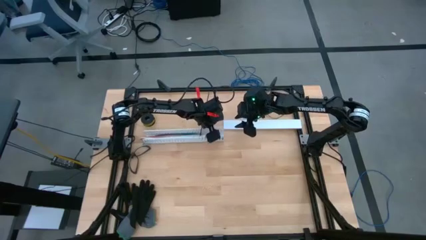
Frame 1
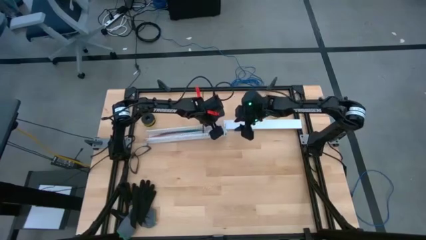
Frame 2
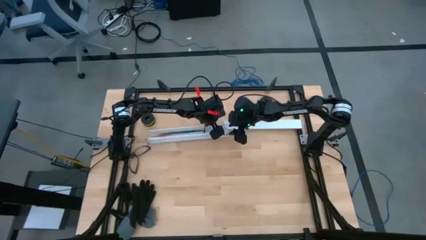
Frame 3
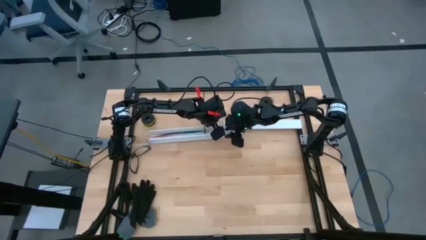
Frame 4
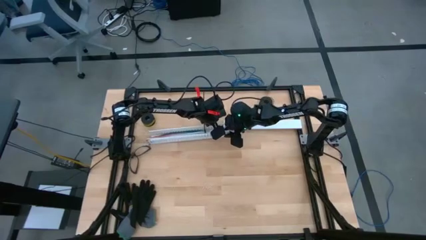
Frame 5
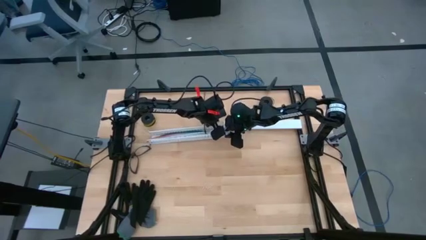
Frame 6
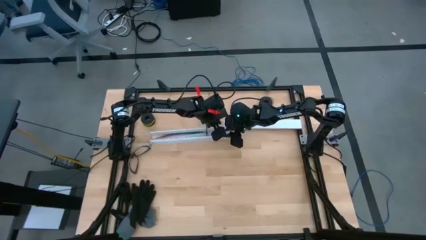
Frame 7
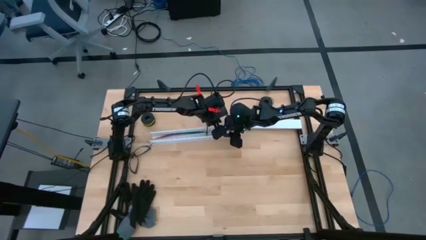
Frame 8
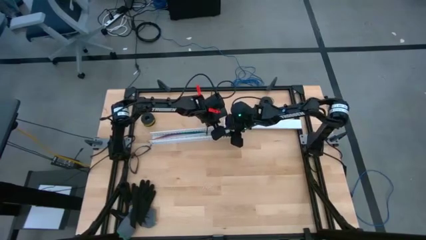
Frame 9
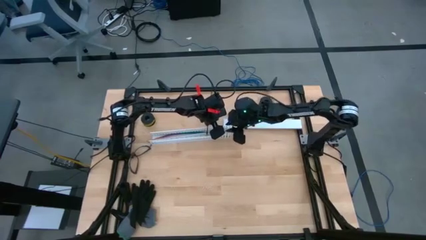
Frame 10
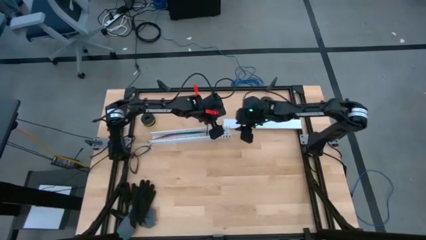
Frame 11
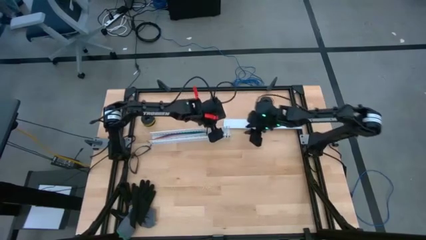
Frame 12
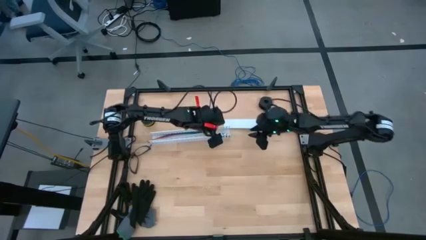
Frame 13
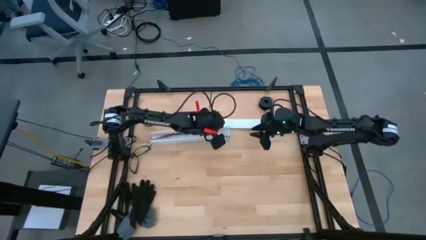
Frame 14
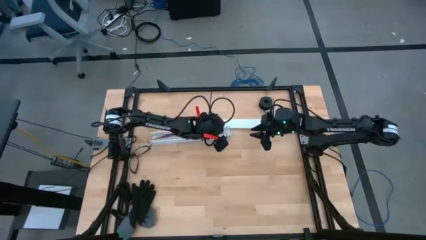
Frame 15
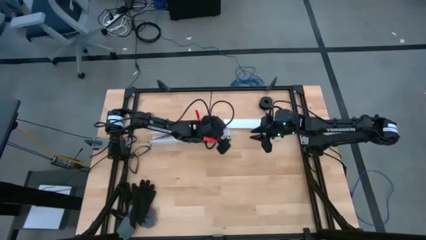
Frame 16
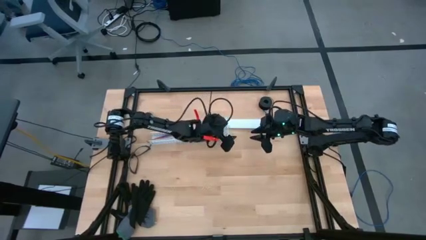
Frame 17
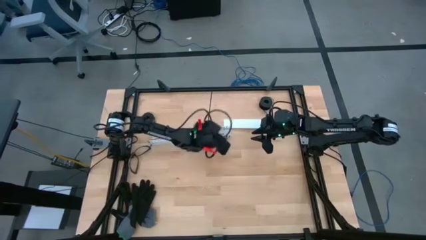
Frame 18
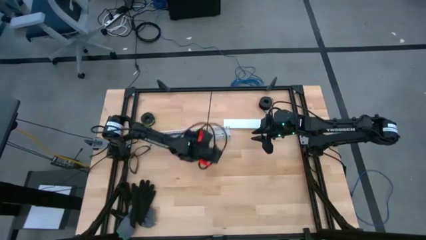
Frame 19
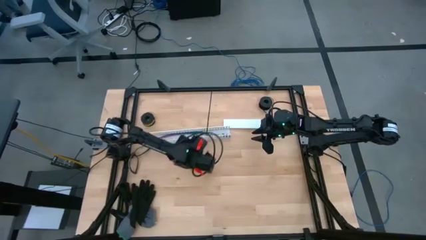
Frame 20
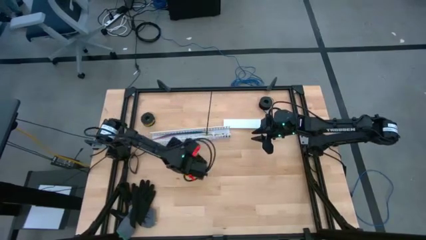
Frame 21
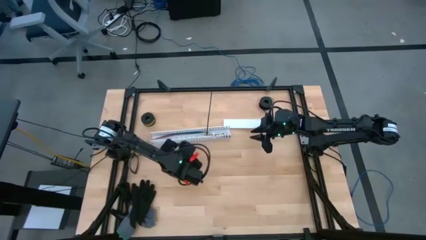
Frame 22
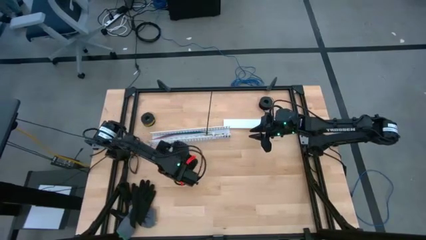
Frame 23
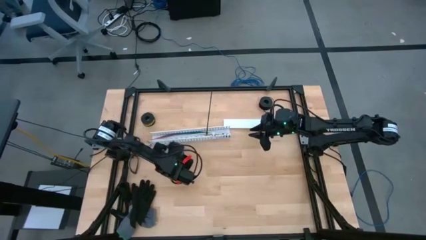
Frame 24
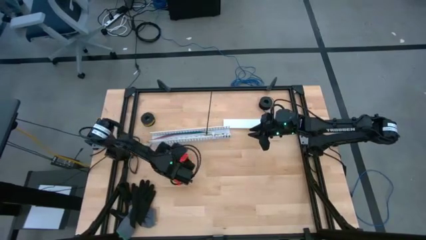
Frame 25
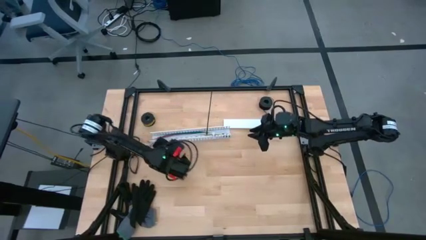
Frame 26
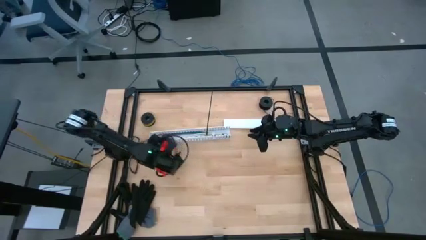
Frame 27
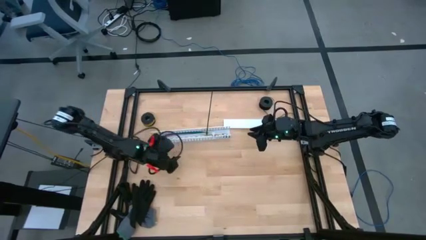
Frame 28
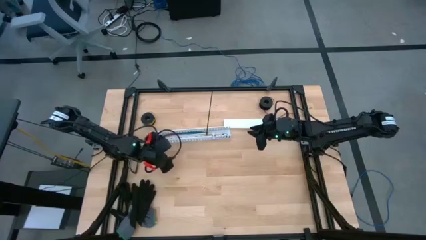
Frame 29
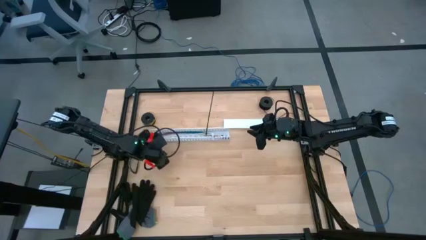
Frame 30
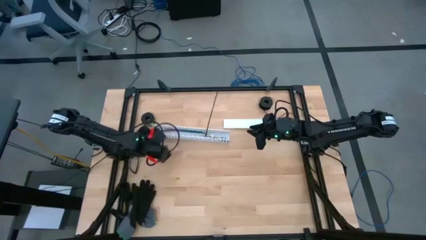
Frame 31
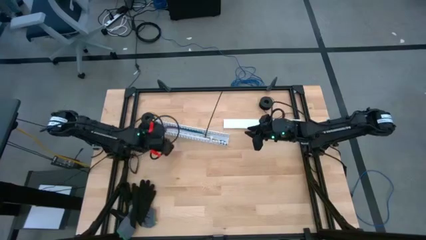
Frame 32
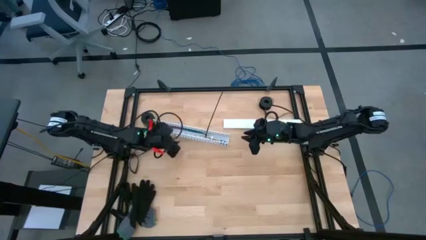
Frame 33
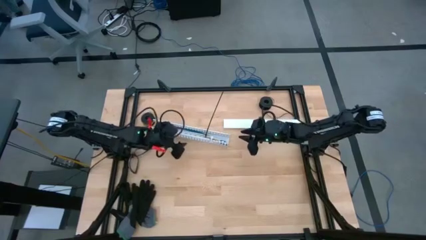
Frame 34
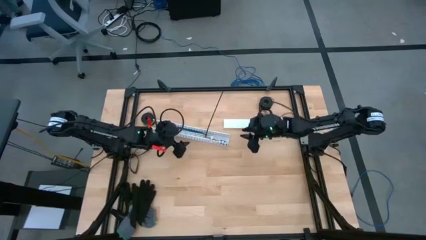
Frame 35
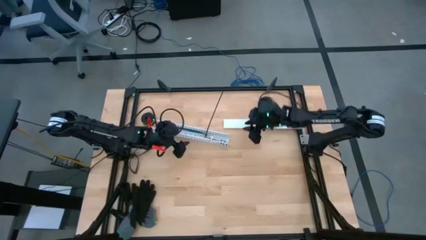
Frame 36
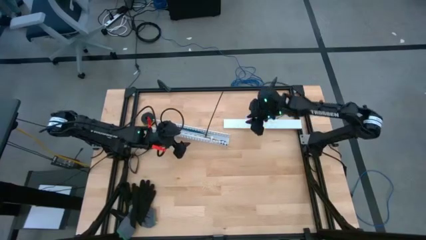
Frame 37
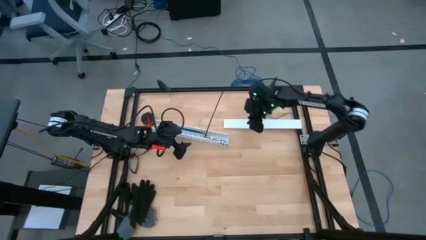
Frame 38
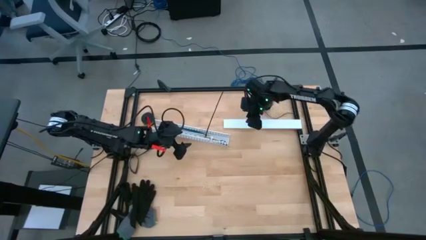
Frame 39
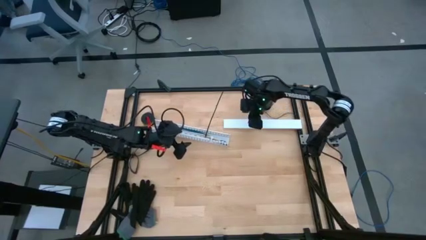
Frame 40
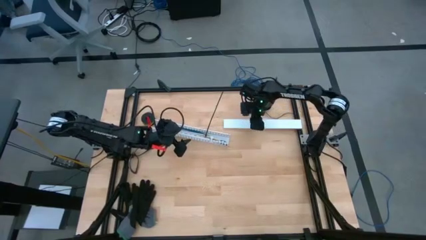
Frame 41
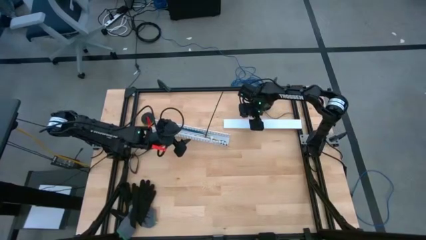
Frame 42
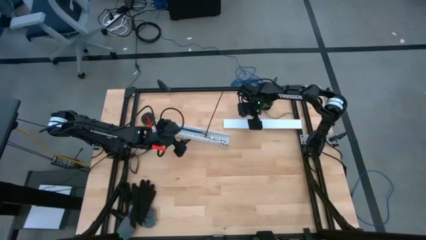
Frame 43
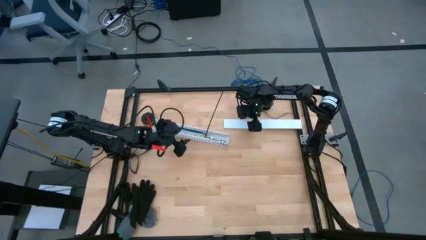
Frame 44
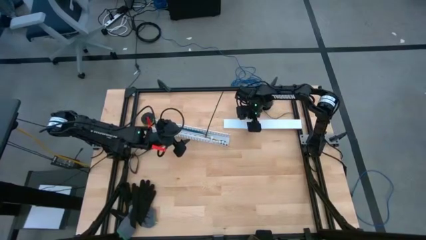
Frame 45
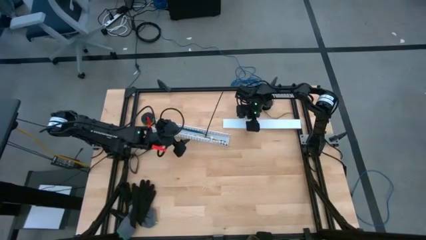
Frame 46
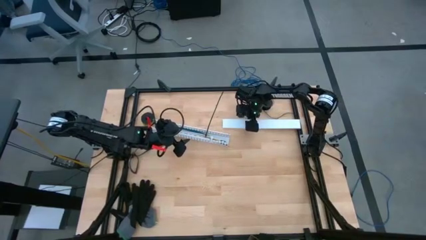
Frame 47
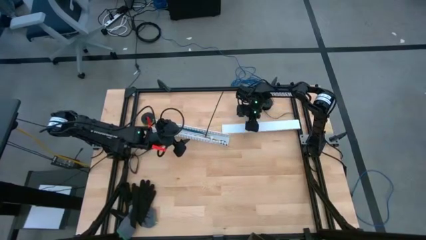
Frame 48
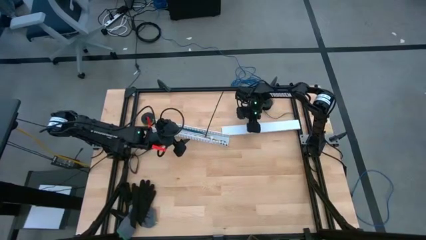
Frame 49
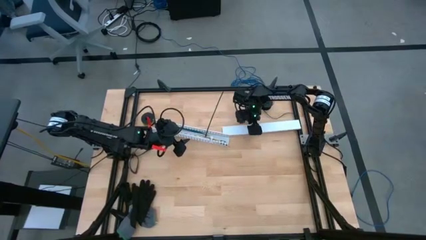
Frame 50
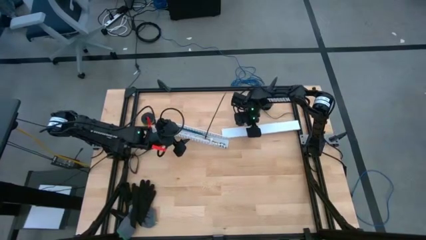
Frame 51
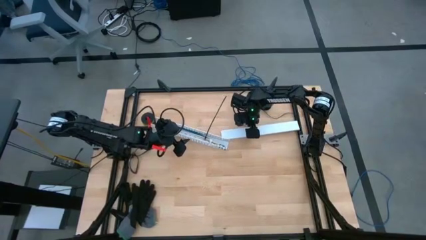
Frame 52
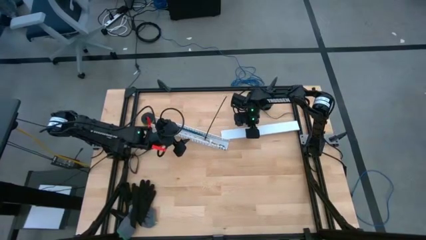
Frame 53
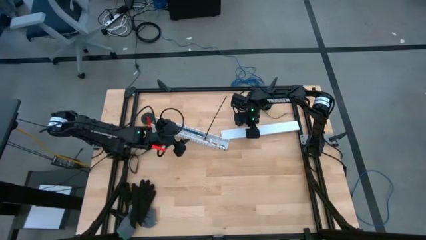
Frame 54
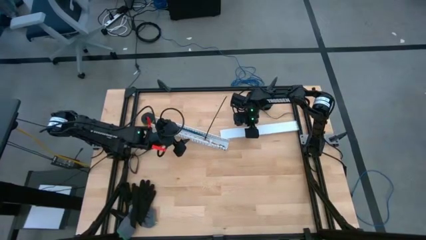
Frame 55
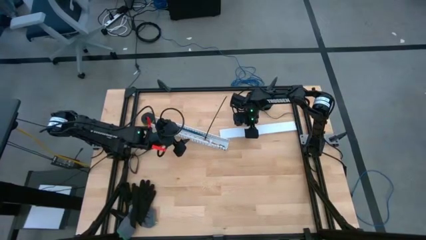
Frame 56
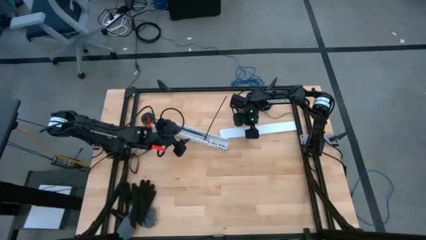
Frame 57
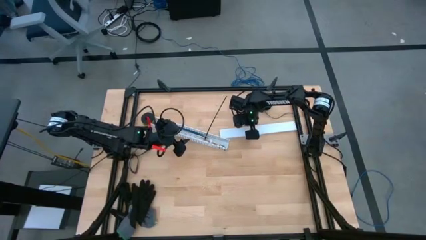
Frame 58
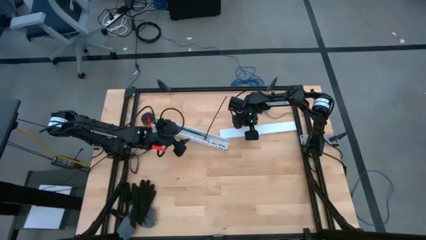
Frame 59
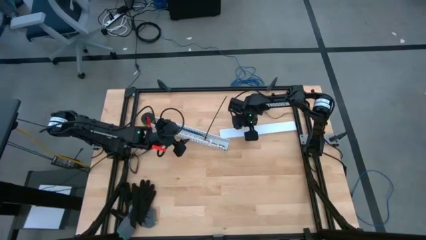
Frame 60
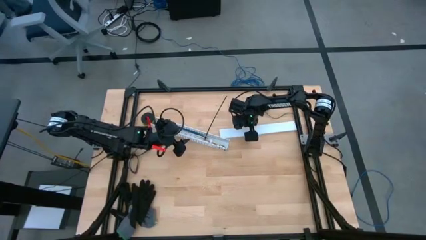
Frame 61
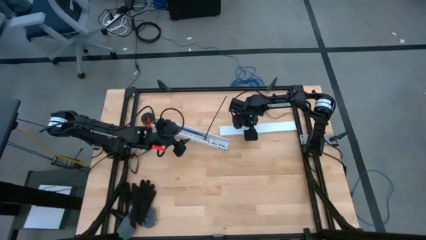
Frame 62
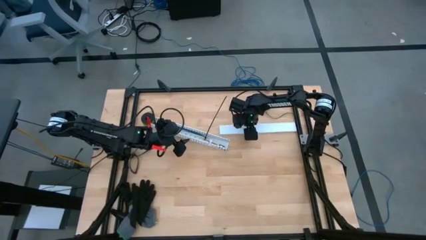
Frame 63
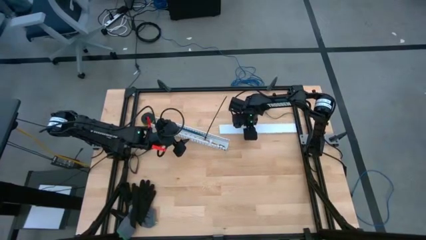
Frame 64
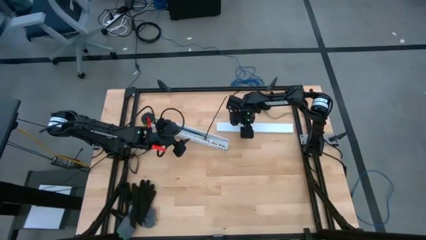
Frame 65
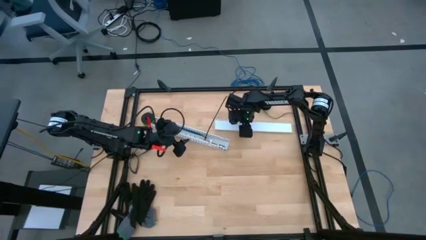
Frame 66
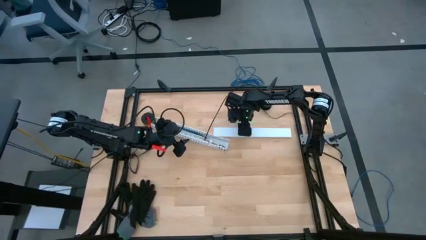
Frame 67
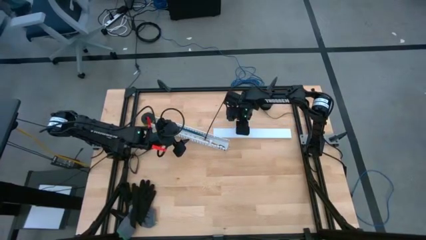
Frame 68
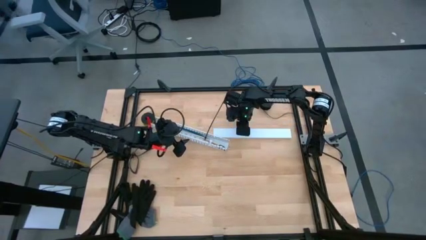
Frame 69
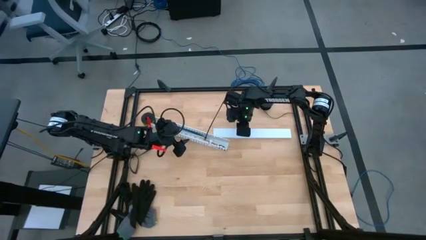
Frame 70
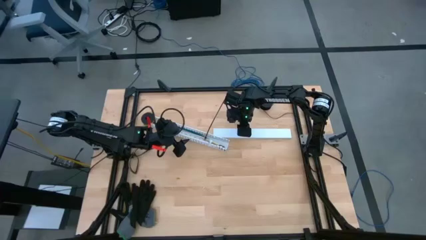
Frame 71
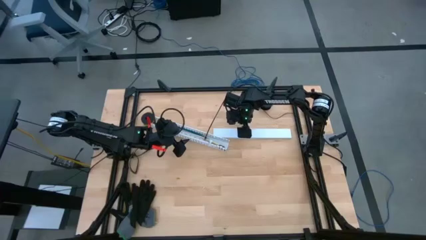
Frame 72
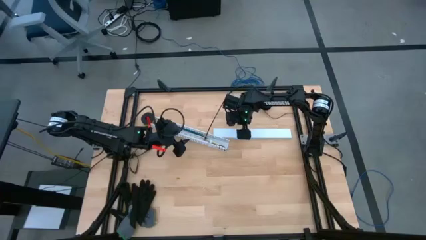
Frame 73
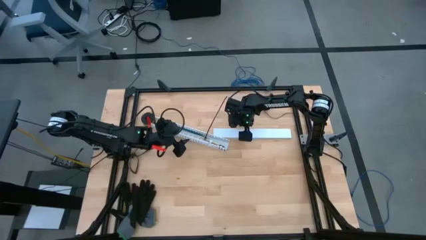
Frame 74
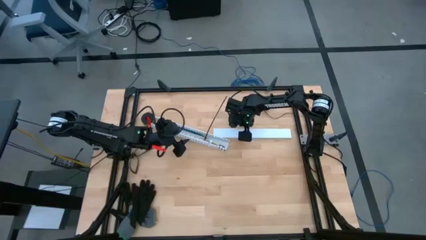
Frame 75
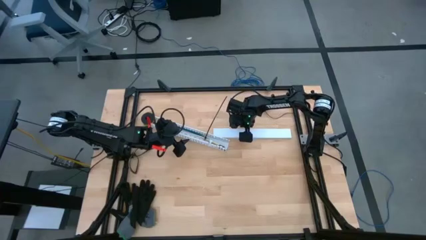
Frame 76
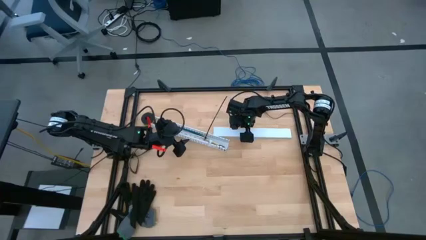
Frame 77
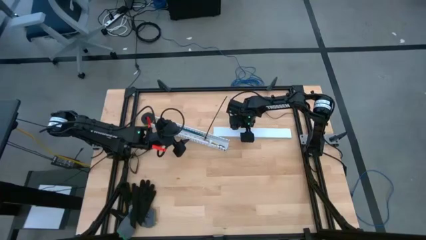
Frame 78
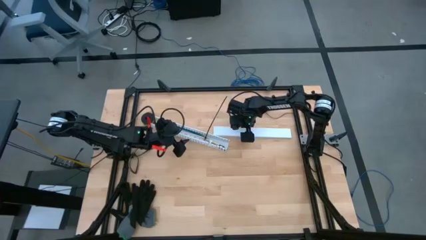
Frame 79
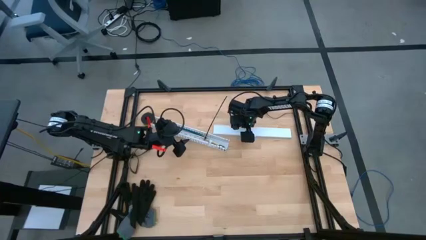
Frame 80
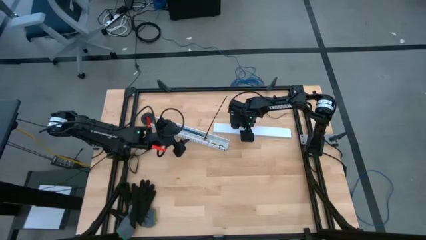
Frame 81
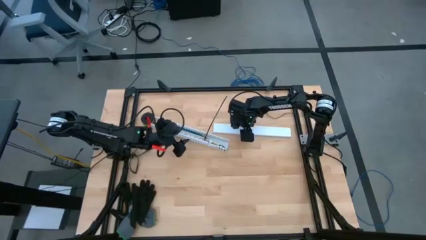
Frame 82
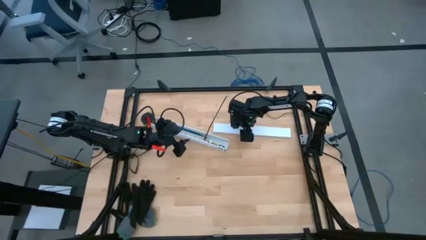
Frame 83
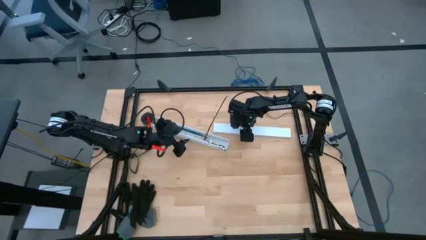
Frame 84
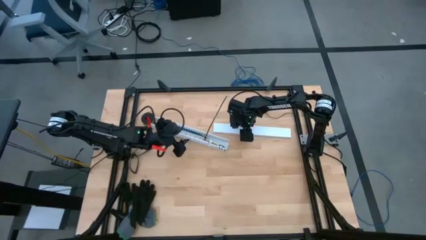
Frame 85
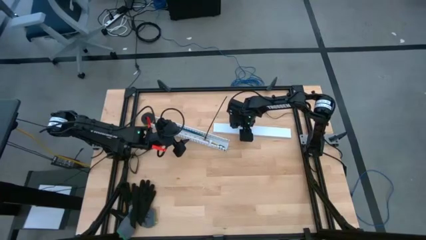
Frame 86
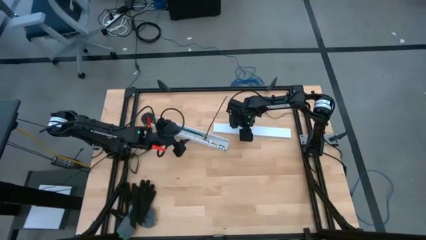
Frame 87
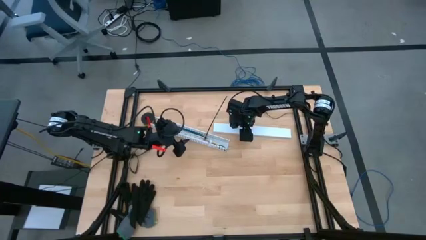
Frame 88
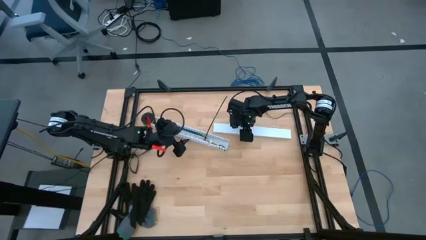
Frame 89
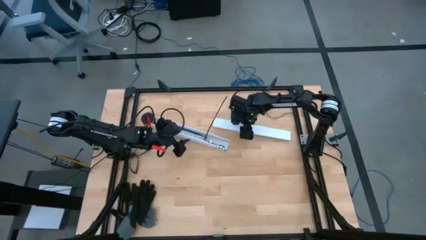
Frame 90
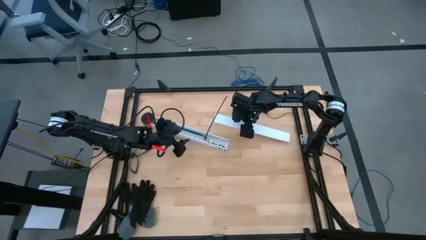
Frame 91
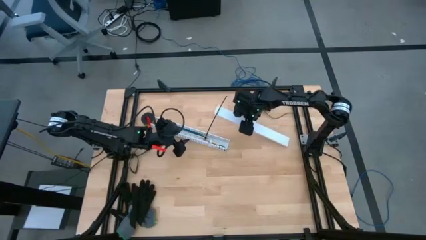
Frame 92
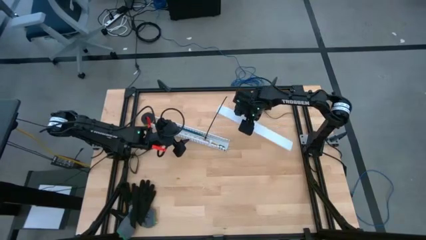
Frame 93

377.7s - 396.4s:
Task: Ziptie cables
Close the white cable duct
